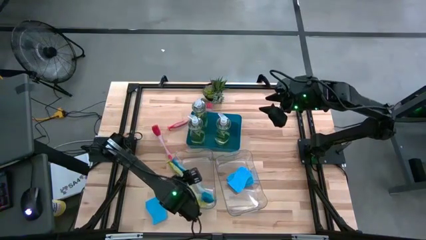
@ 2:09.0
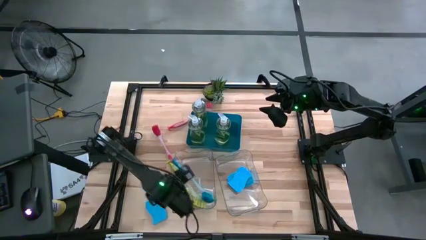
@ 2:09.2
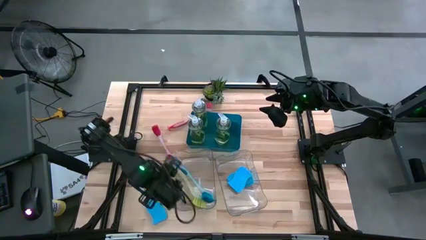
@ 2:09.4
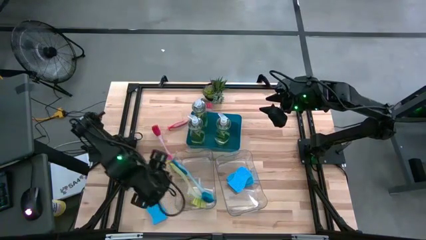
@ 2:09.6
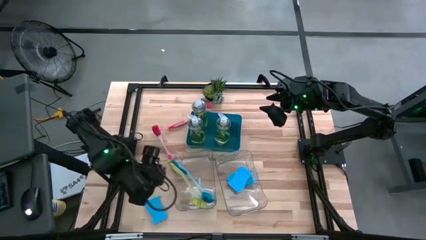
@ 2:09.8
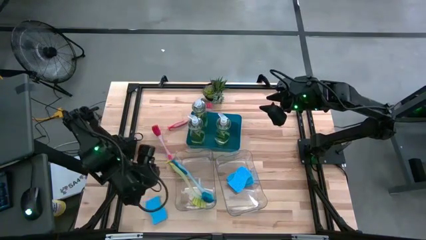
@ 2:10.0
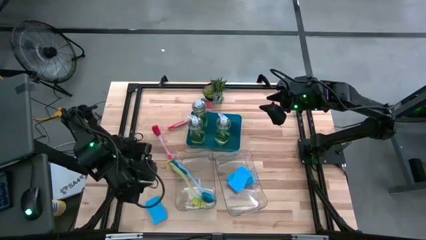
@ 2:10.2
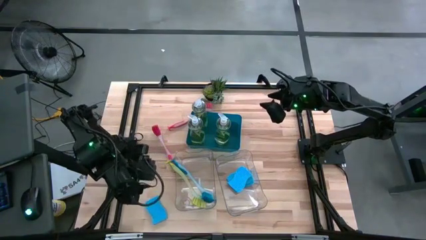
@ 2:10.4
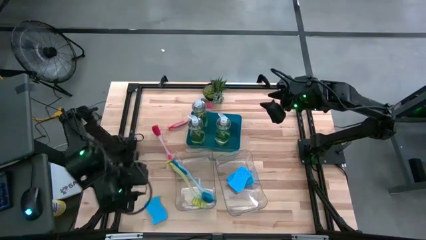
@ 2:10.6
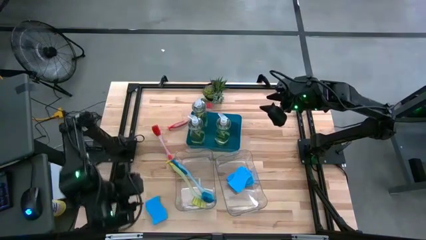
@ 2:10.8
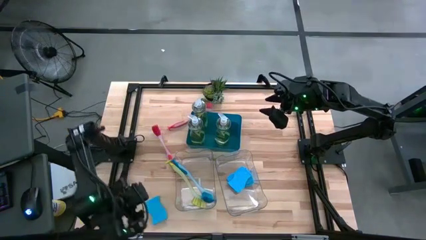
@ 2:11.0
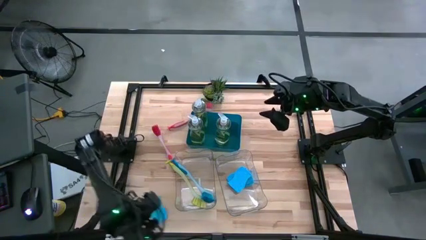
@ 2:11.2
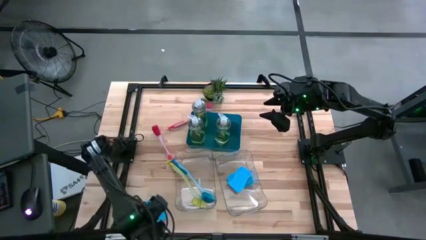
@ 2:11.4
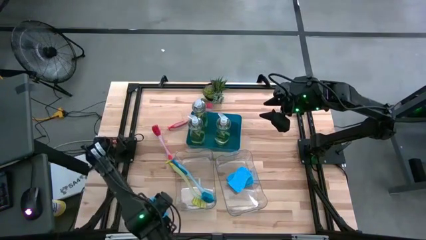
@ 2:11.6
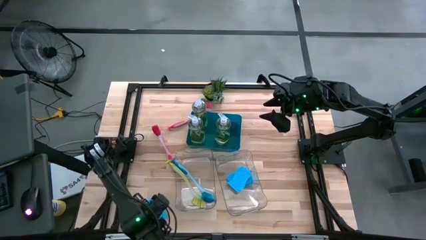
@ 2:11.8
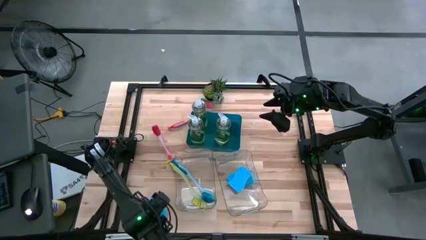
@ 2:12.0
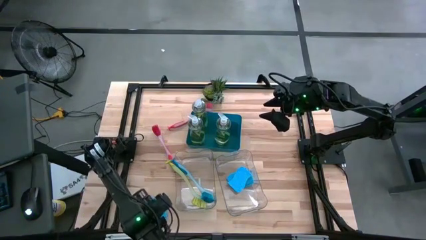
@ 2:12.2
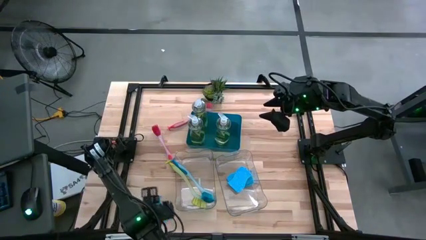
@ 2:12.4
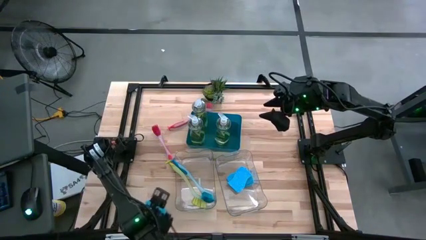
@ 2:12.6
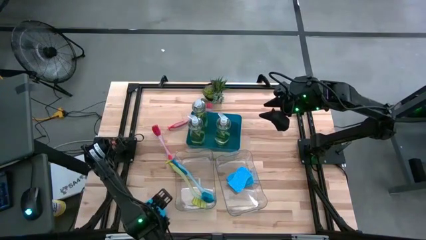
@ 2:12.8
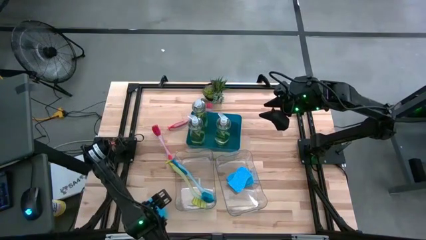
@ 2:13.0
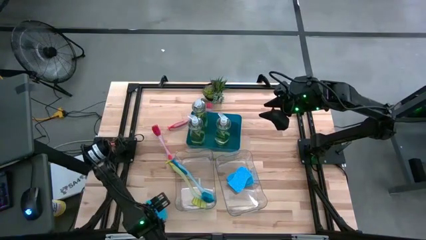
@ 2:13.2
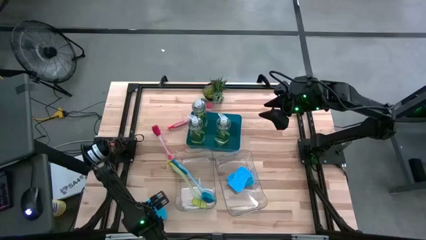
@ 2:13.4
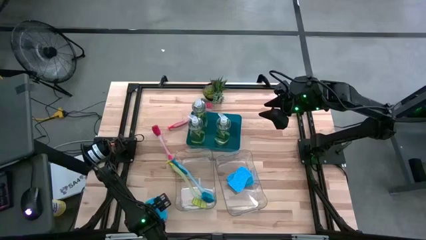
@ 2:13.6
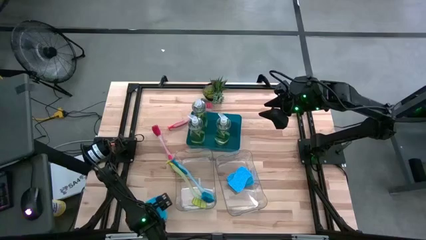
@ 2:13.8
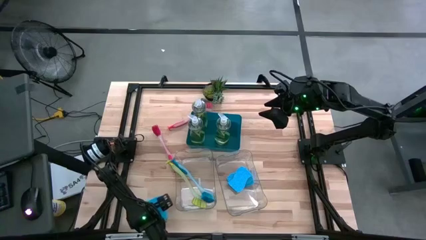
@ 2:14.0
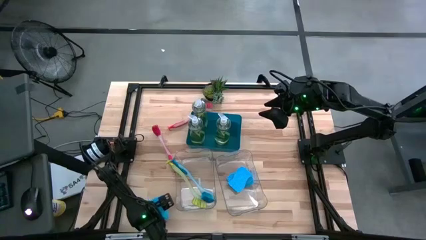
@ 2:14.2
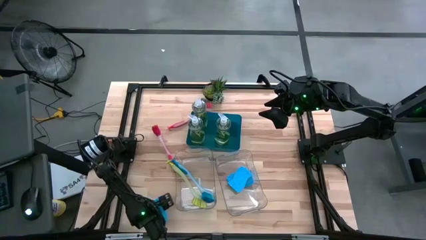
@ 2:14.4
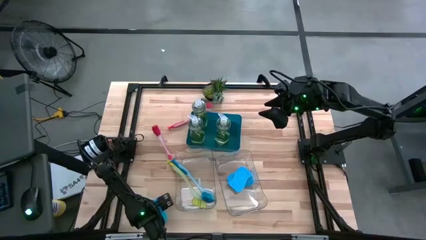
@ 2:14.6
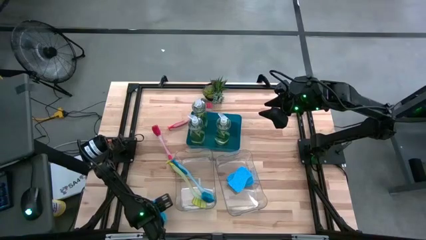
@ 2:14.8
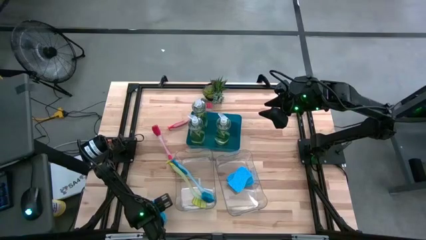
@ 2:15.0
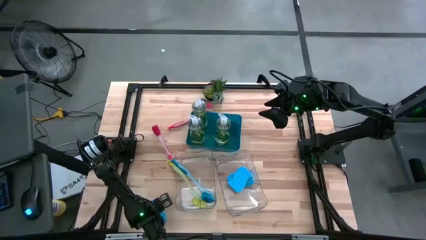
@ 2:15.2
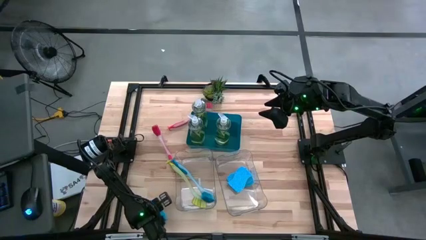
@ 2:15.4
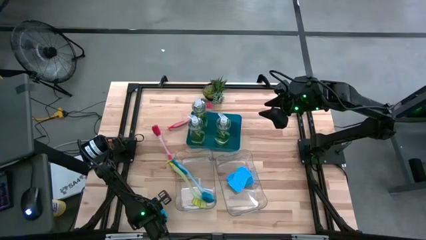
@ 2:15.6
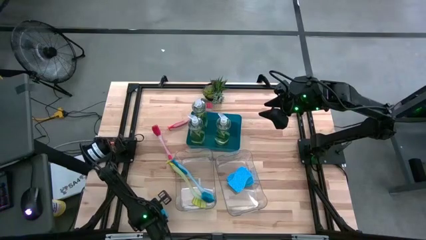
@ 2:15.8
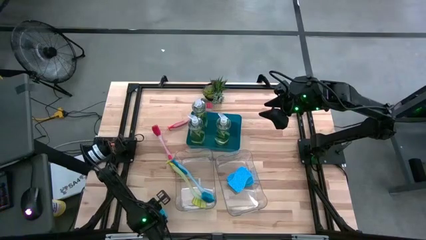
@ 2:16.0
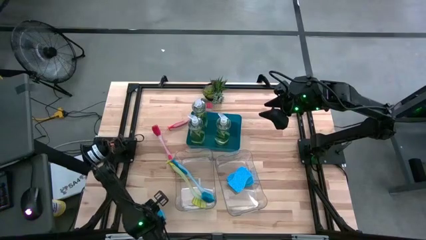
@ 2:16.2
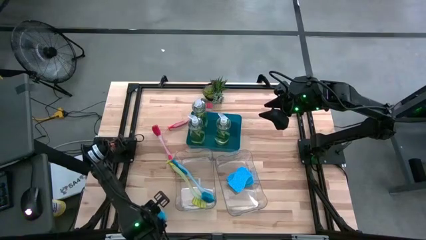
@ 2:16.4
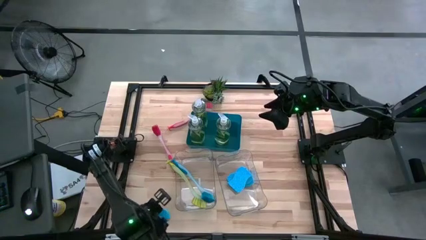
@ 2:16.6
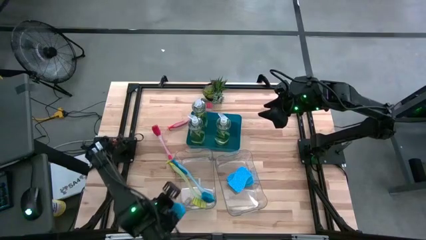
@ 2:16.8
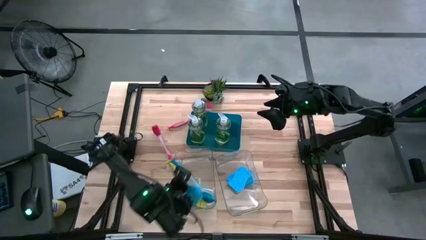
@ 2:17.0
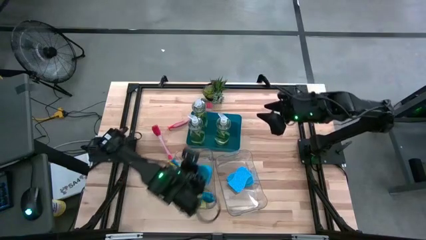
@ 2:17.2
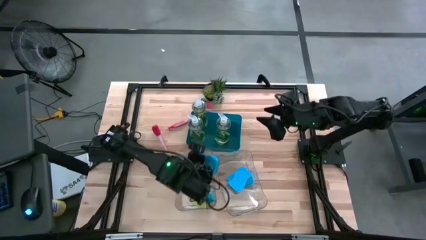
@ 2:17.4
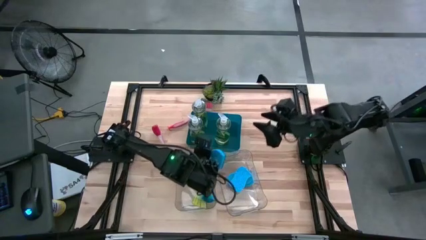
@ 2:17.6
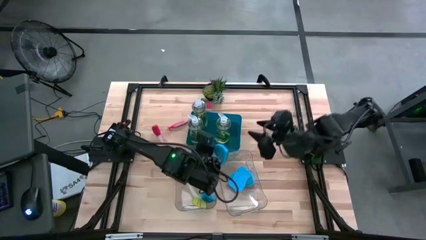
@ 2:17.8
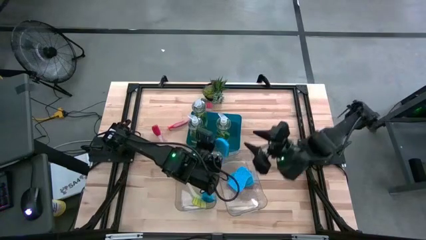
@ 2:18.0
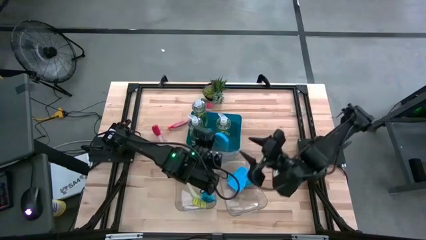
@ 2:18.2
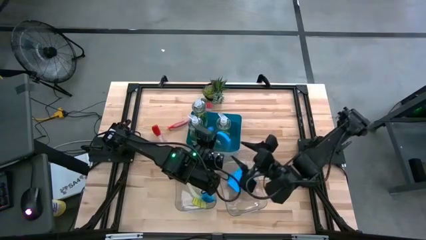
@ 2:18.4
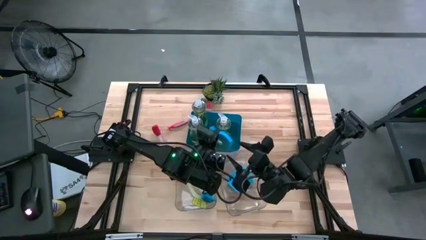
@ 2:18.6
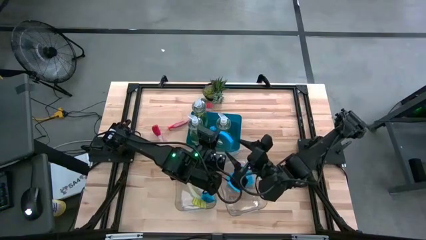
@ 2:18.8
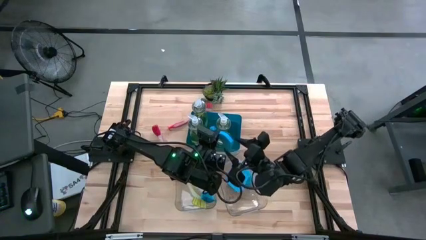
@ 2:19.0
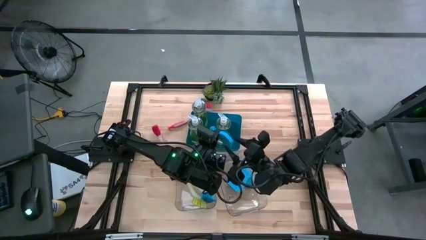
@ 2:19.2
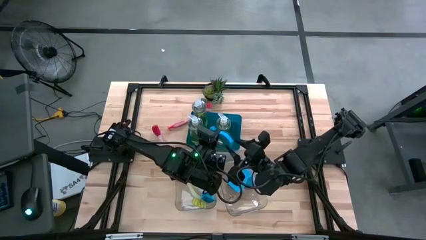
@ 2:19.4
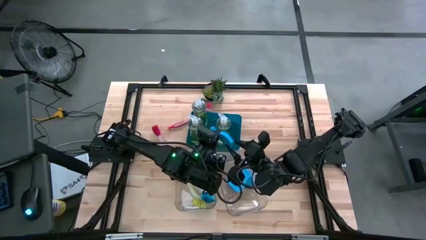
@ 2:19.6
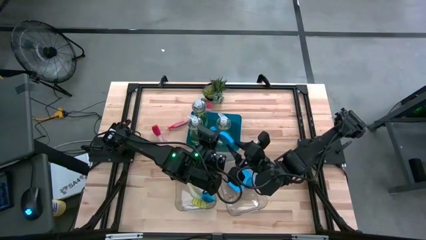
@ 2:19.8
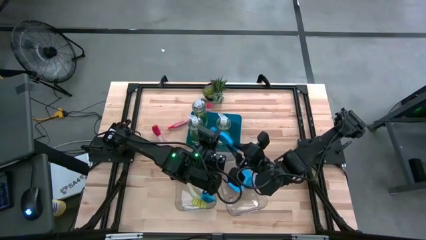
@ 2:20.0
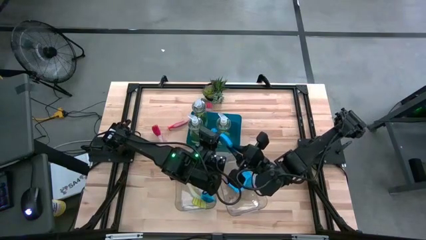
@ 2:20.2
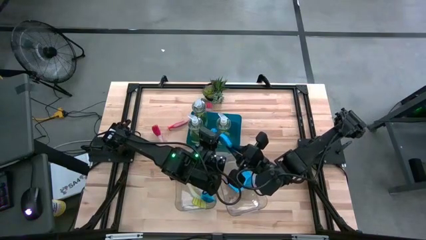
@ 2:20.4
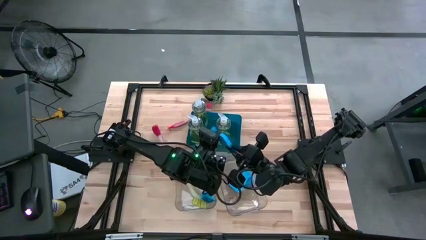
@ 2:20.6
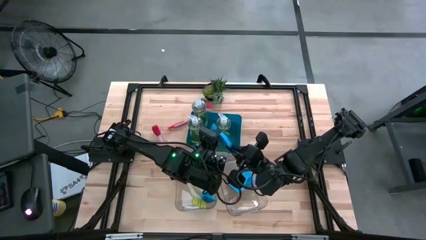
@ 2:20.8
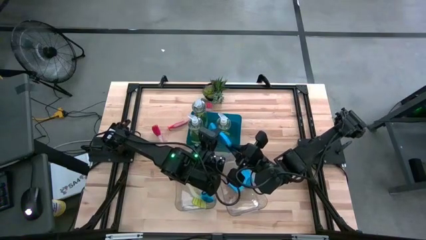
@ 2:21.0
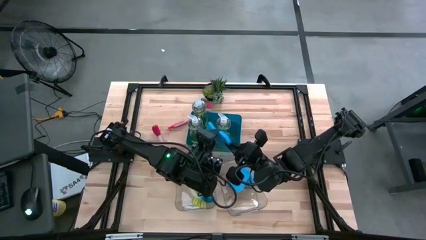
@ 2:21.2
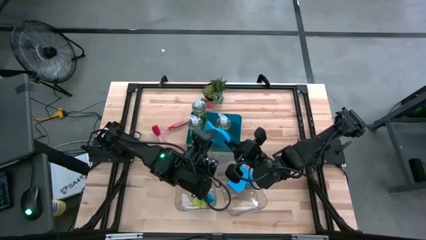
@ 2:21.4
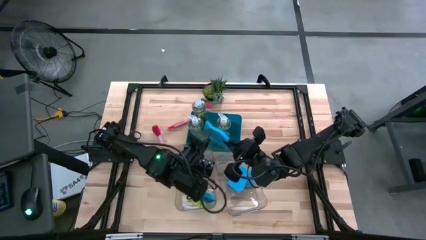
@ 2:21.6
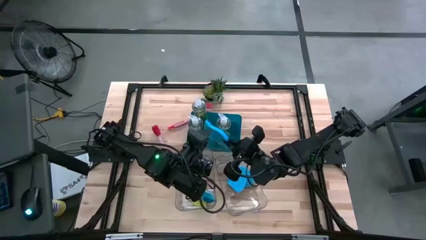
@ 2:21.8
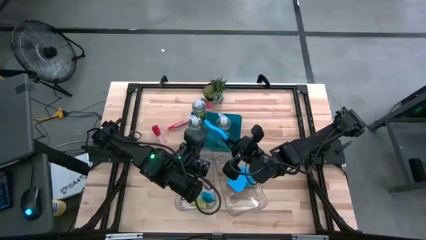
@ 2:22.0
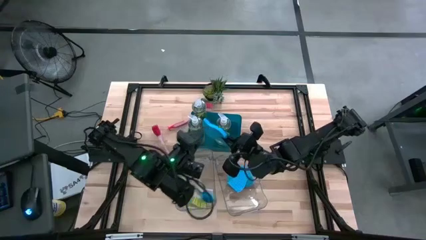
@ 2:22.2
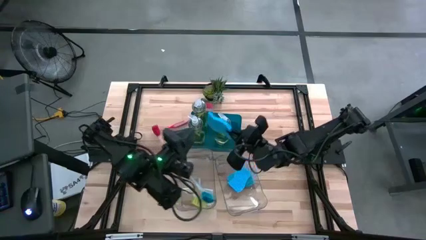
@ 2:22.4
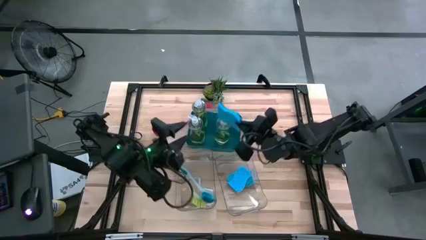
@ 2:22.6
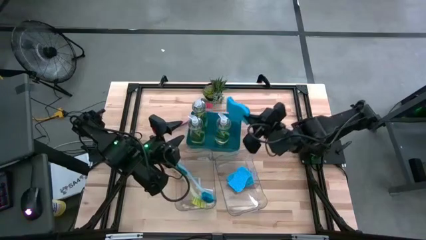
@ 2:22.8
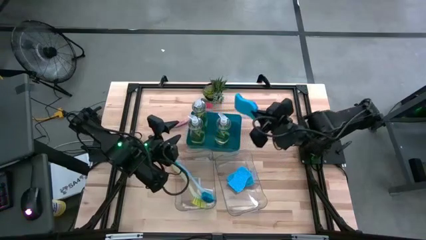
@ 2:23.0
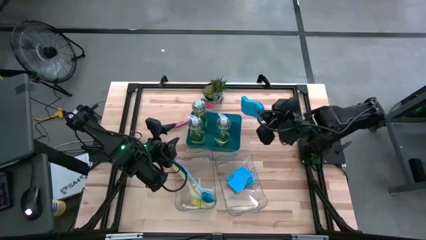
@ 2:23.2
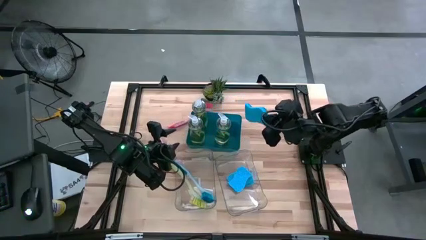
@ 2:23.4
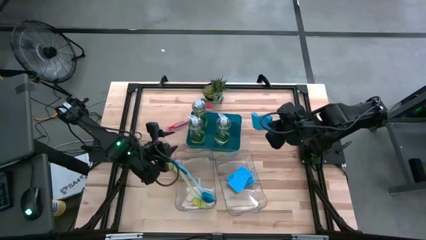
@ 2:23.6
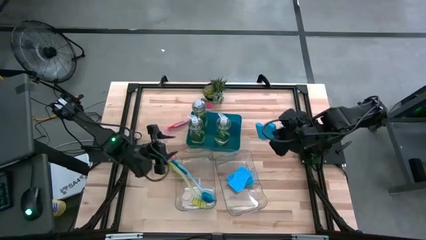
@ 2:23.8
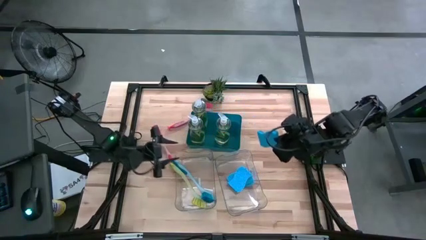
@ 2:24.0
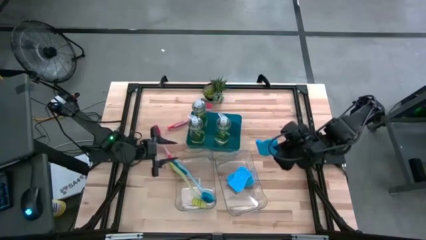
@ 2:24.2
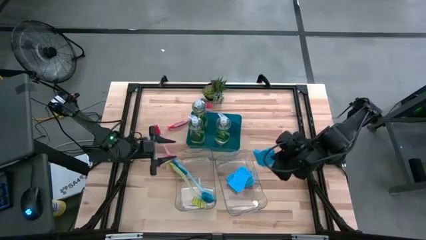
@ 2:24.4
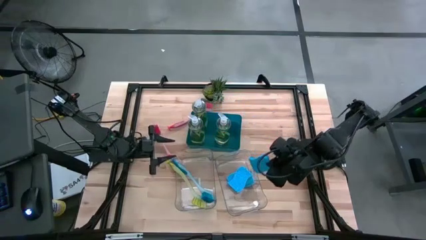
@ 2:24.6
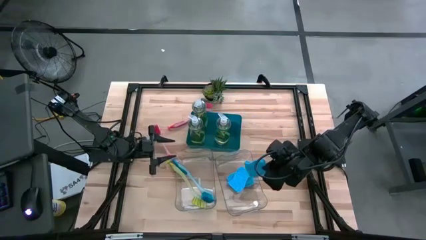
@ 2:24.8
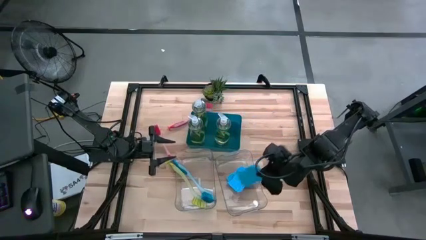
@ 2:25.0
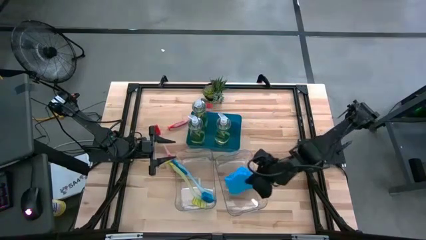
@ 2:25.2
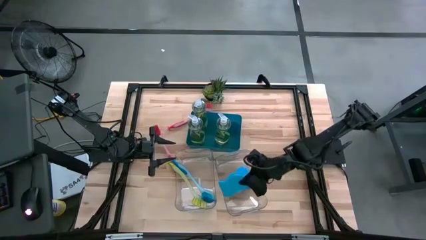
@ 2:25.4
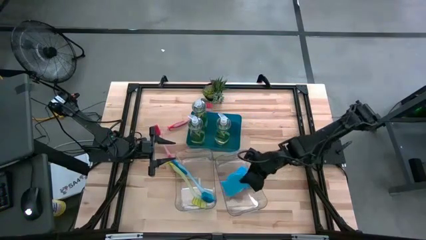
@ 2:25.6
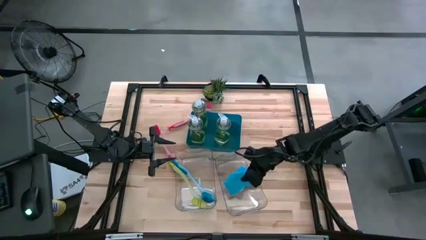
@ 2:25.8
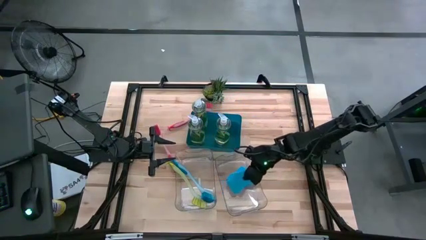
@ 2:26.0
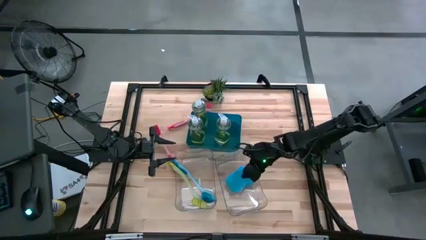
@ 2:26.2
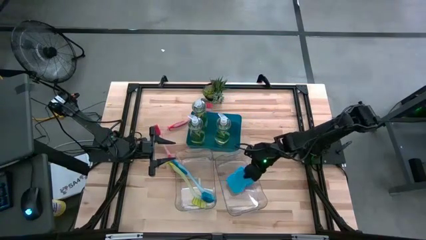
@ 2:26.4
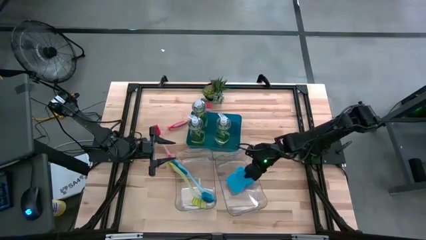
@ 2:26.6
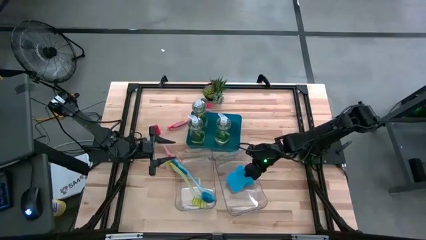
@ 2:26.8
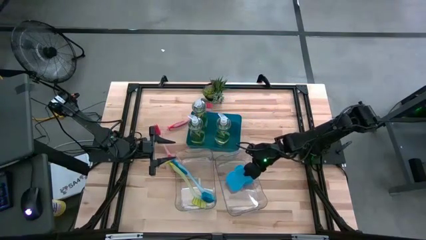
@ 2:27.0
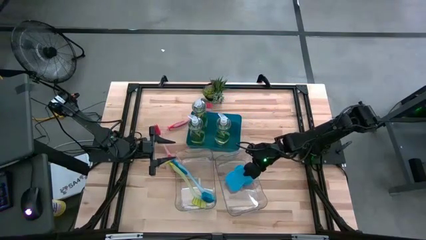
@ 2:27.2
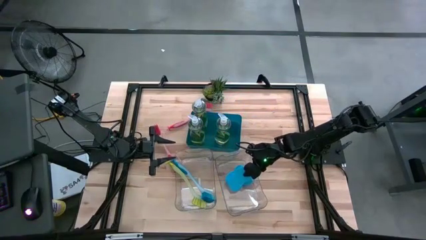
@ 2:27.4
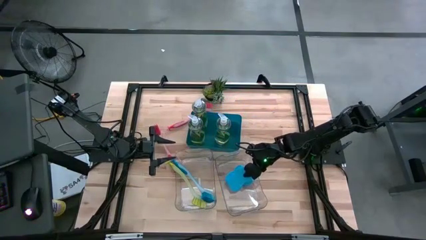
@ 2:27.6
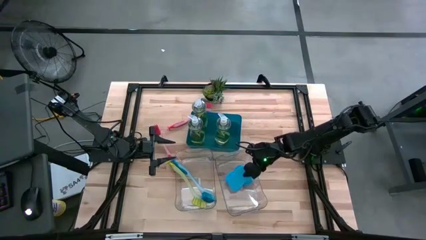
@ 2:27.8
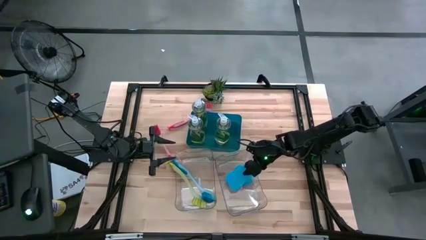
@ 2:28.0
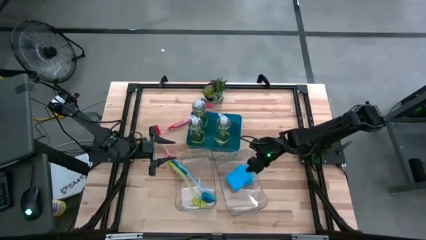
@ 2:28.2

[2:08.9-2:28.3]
Task: Pick & Place Kitchen Sink Supplies
Put the blue sponge into the right transparent bin
